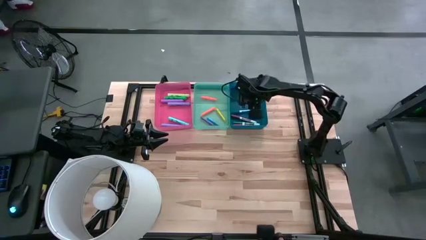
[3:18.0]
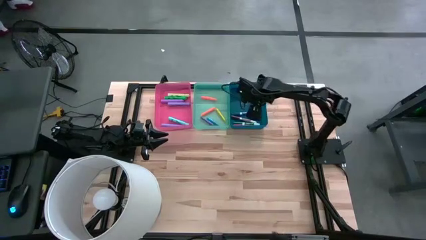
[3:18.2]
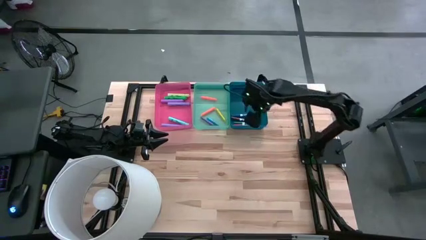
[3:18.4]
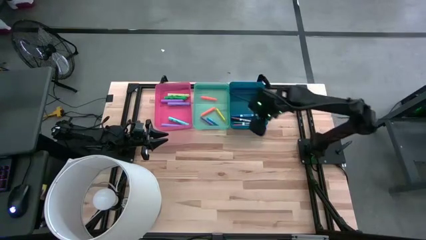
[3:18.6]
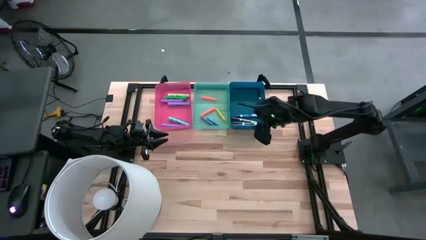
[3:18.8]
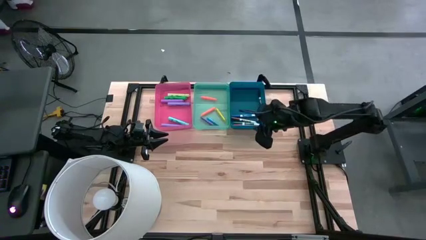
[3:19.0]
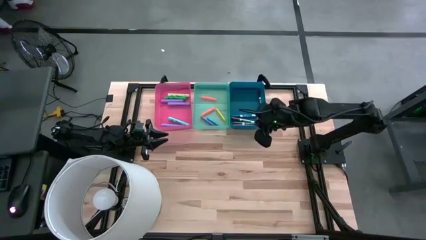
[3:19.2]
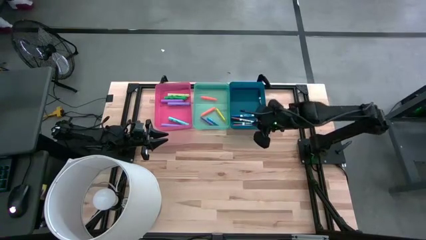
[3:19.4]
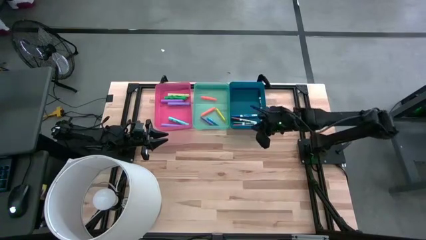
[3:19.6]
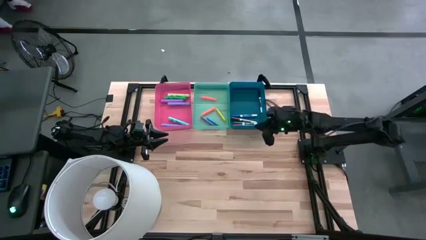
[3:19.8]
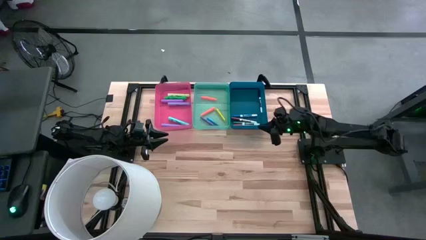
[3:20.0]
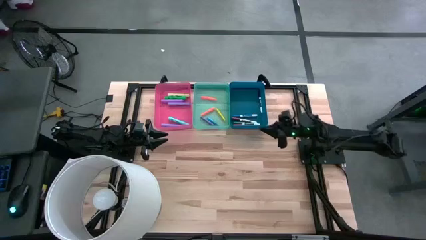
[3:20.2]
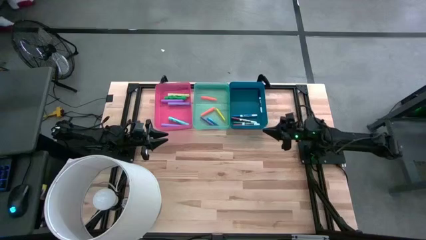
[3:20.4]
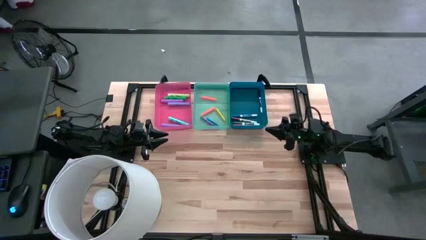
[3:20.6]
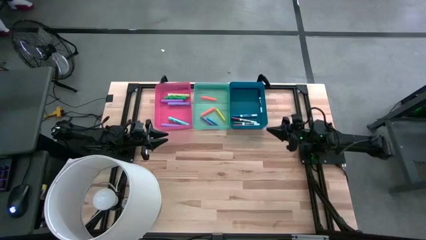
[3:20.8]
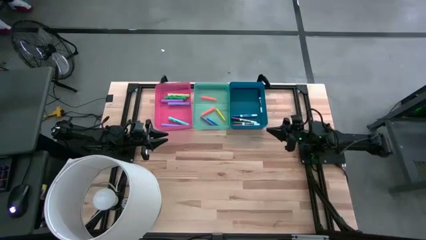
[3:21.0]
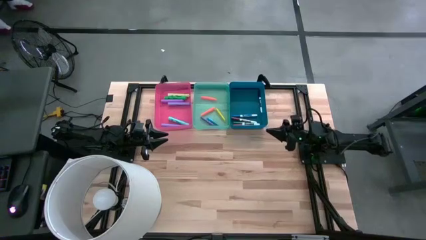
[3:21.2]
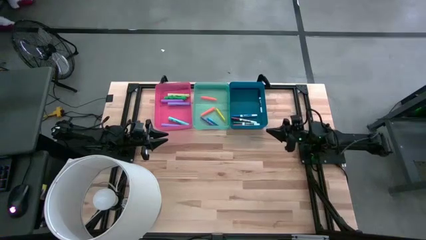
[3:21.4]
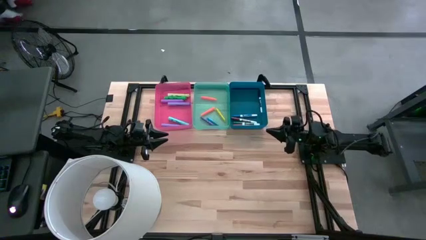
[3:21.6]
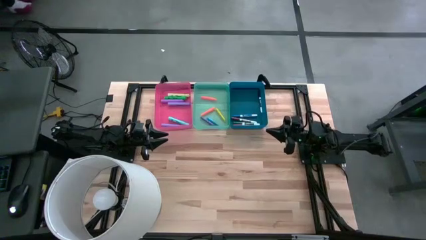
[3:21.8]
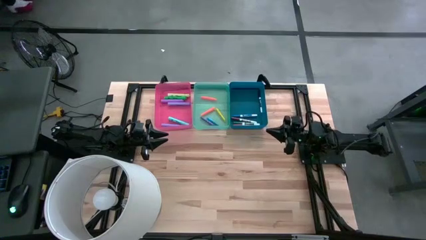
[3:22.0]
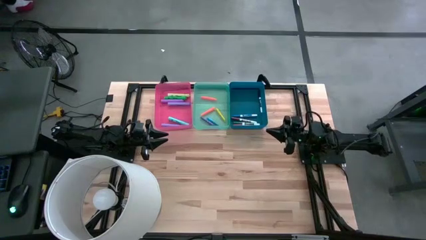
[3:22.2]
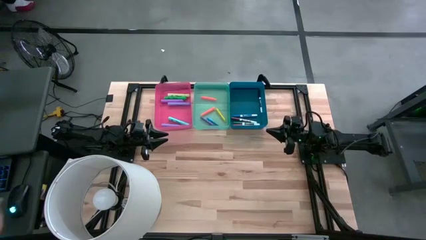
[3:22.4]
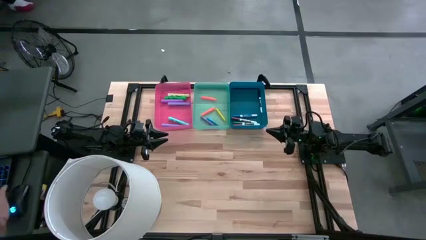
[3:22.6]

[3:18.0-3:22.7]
Task: Pick & Place Markers
Return to Home Position

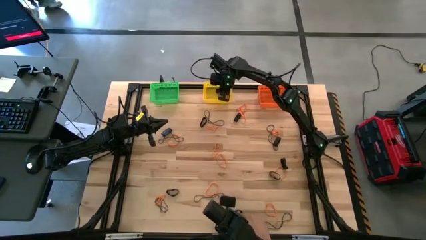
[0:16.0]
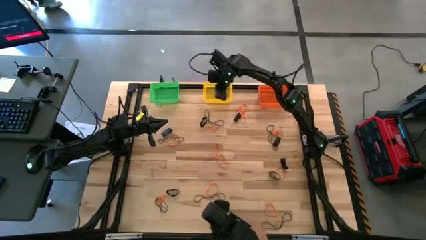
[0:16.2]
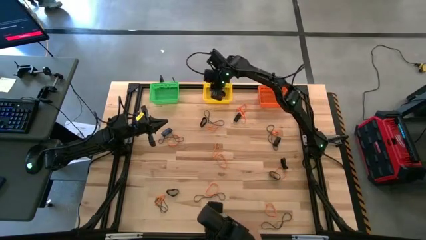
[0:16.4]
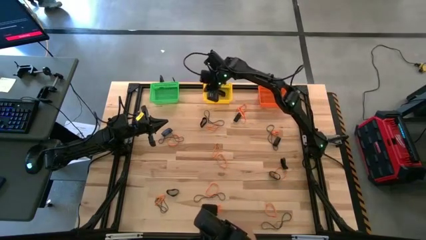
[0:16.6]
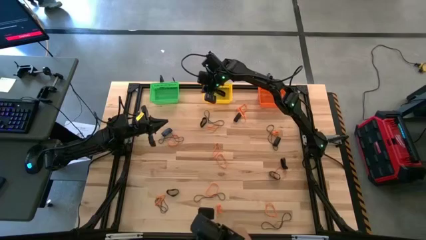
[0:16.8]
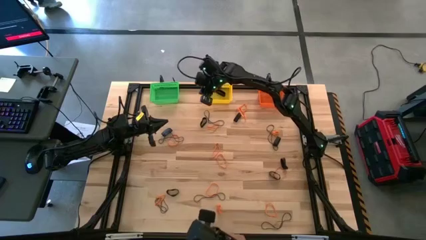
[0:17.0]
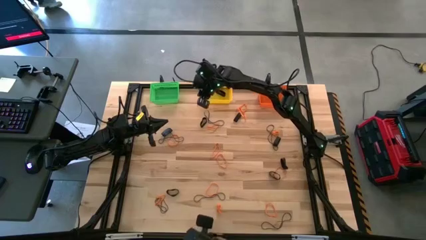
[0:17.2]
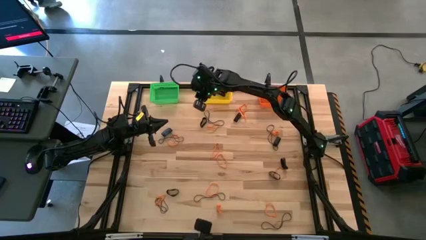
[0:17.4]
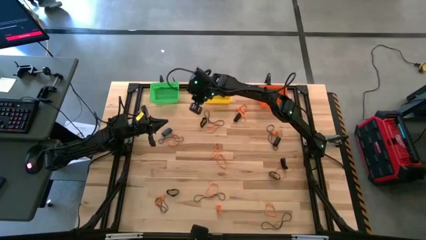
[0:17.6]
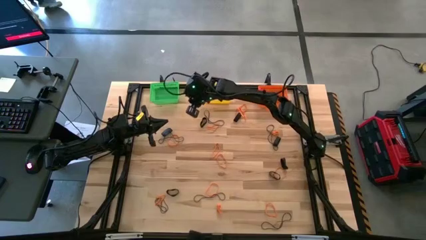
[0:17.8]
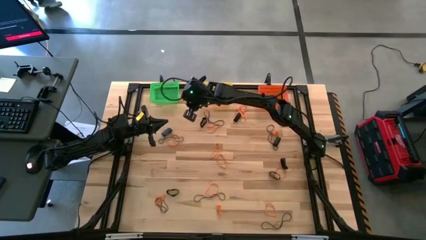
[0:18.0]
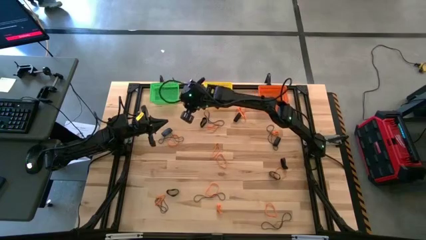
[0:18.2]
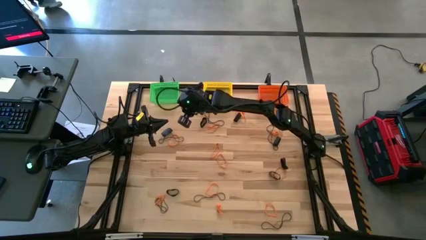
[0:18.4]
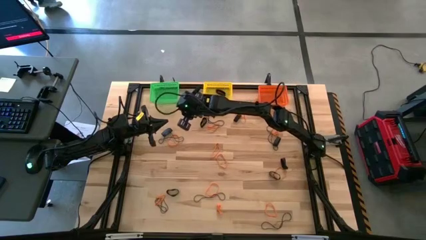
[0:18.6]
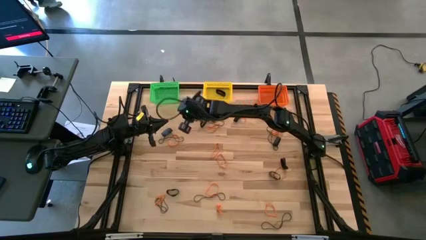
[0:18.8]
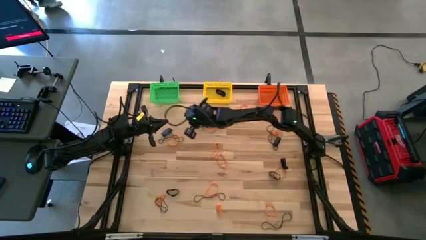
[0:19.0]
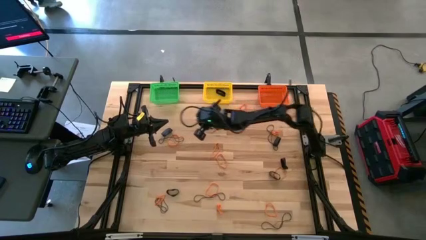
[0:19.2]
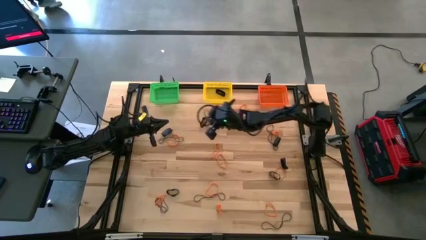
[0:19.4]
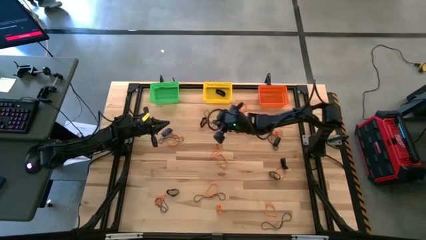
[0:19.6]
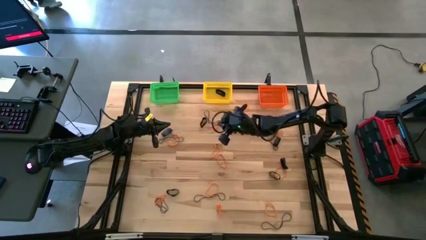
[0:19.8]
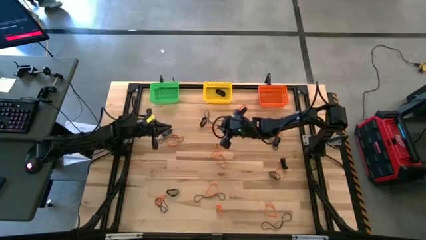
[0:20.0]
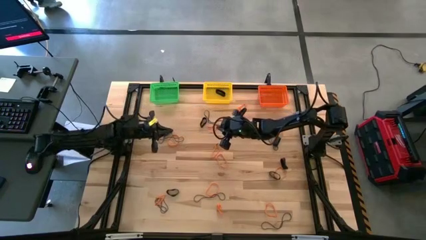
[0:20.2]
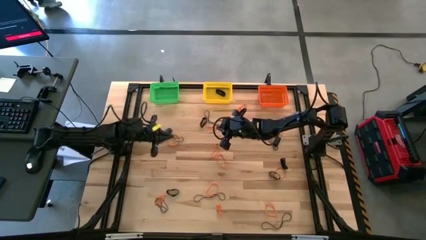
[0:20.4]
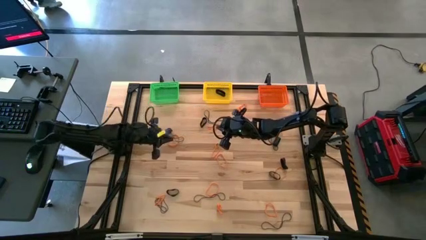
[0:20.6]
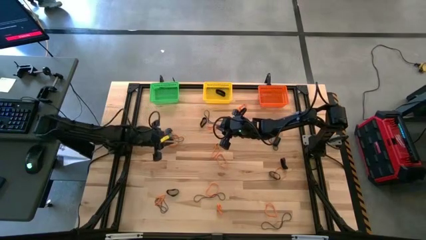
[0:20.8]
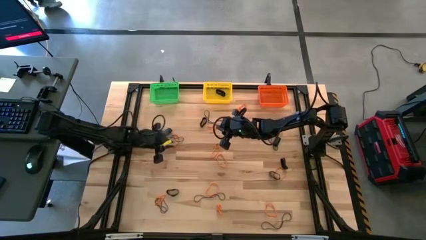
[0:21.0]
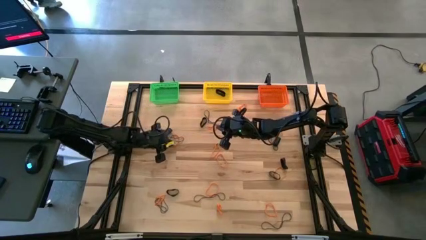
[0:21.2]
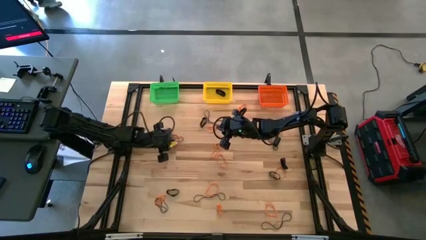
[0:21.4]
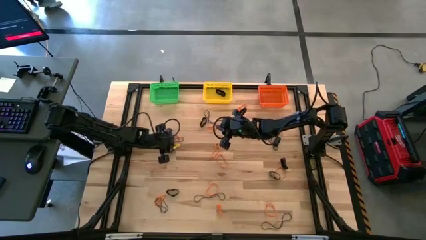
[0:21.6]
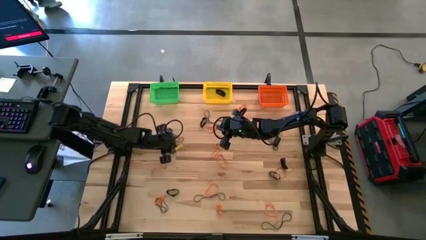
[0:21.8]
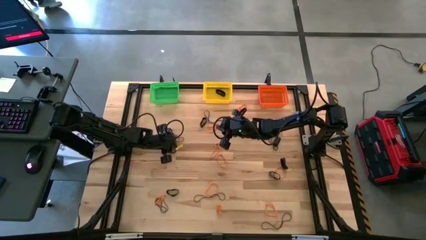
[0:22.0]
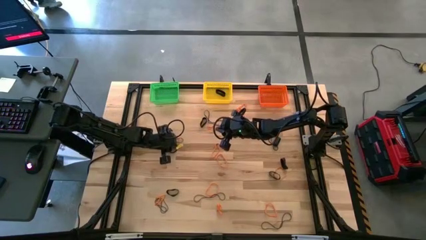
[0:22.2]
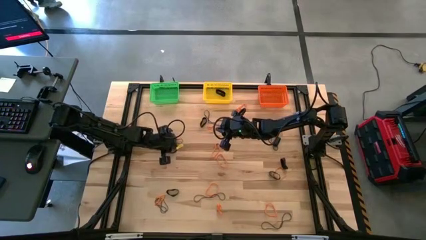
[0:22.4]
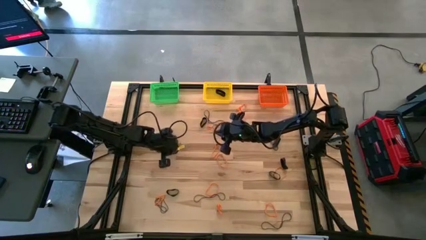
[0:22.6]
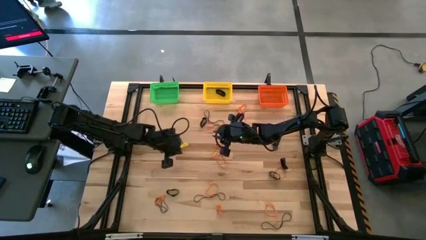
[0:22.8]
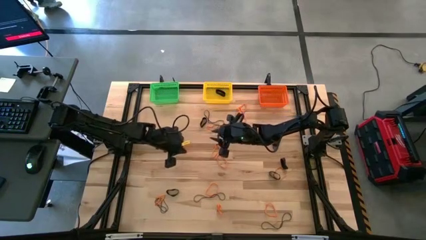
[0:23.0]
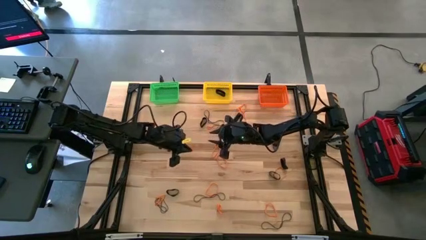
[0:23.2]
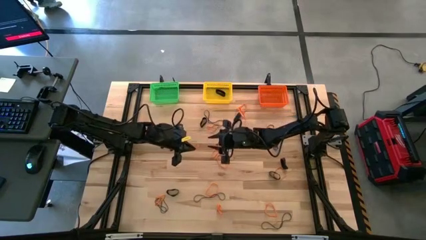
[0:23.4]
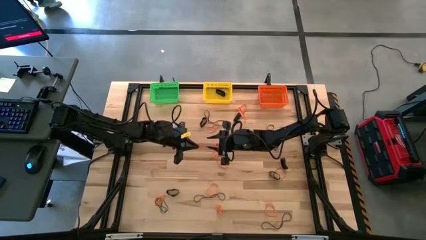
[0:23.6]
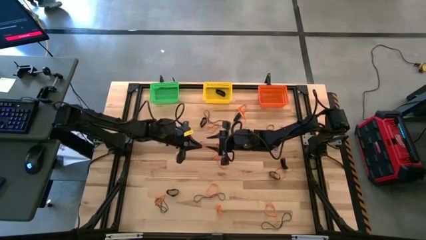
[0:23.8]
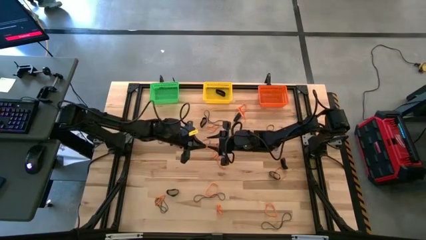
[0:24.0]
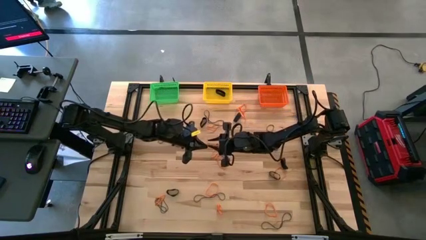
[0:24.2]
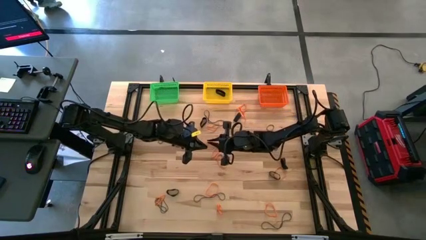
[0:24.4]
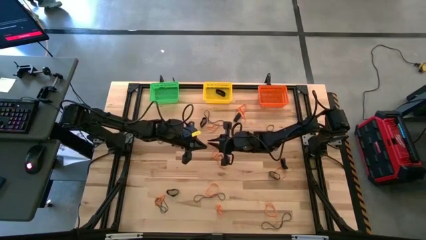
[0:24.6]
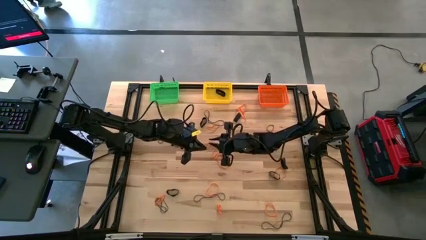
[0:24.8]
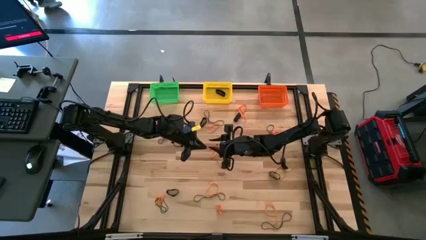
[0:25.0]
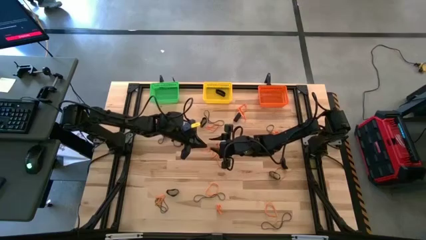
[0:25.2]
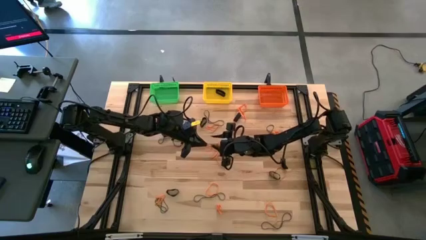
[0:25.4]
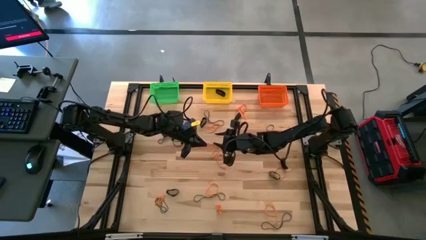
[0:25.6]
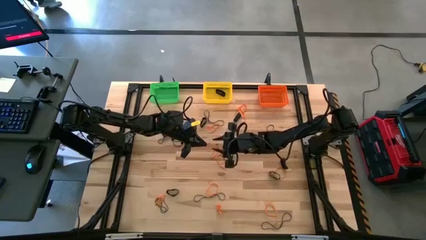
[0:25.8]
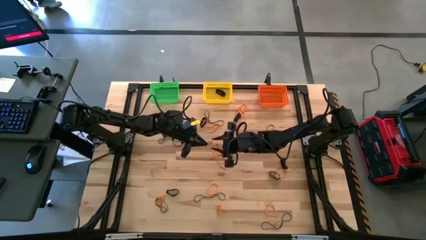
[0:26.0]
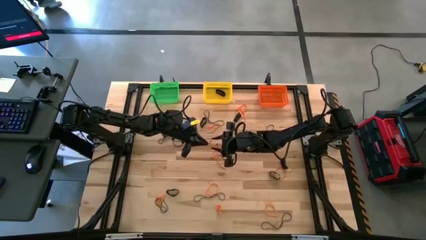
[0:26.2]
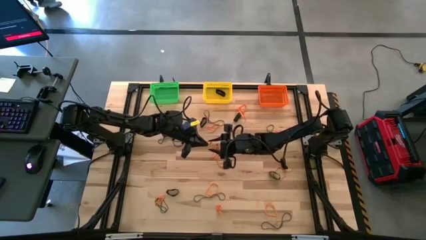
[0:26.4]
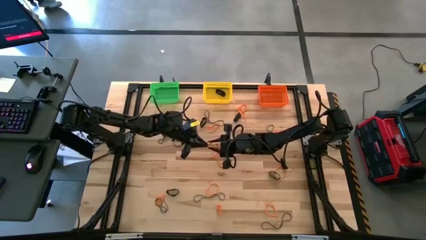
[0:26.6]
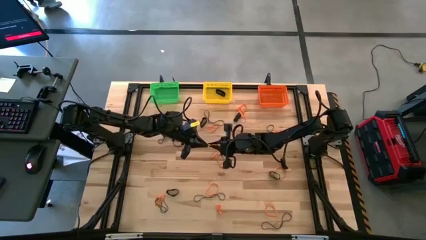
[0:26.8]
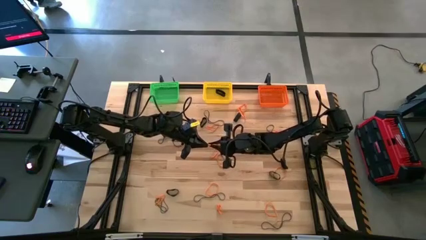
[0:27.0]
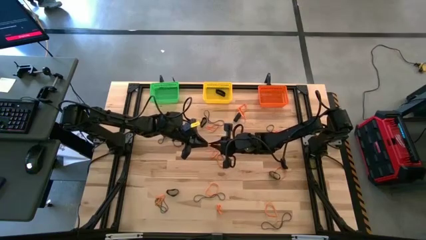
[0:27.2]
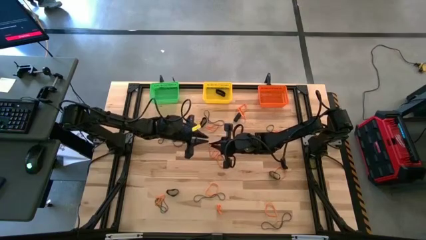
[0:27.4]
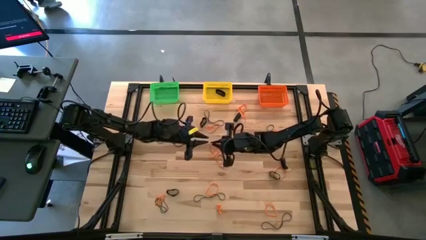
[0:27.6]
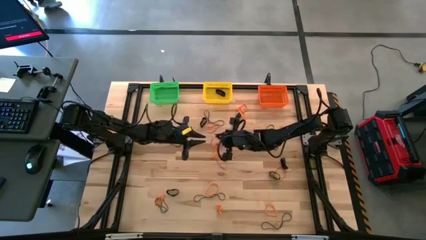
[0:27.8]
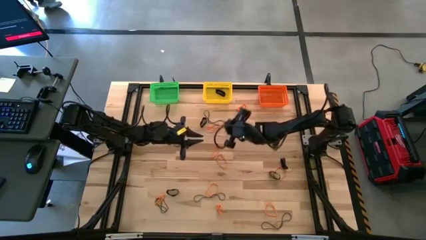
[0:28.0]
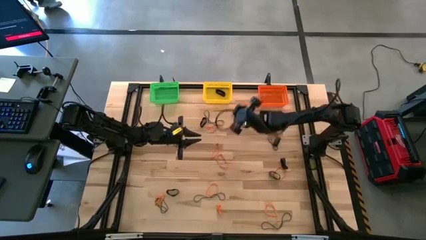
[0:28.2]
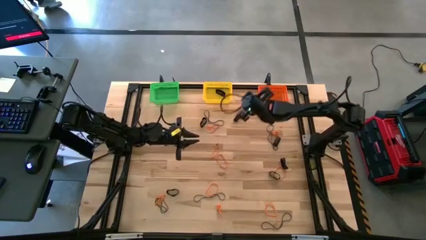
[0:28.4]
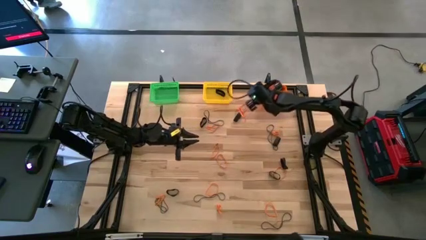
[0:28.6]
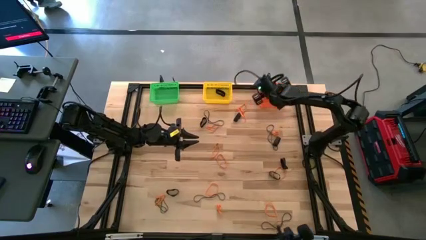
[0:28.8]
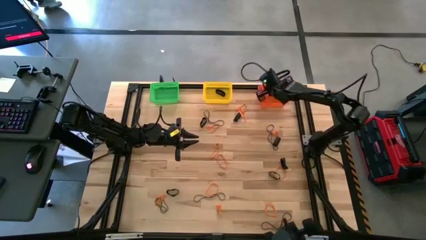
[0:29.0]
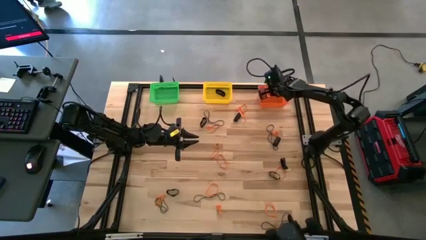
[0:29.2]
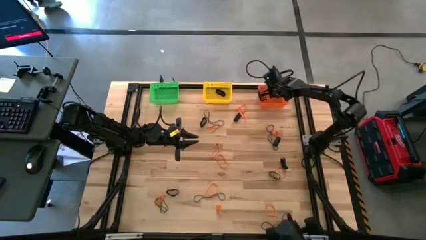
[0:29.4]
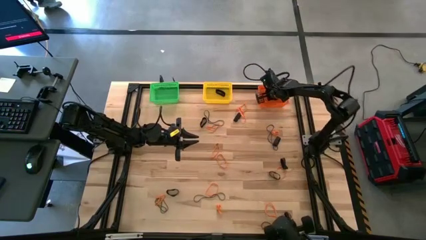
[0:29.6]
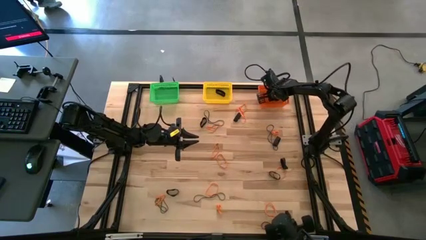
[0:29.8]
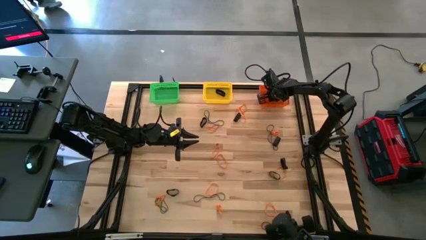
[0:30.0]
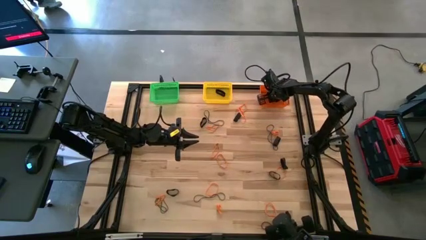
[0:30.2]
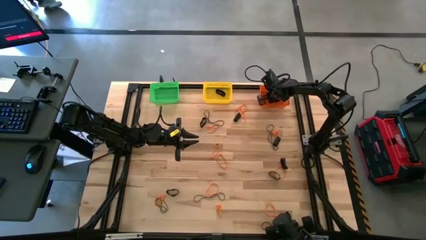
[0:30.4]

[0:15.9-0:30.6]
Task: Sort rubber bands into baskets
Put the orange rubber band into the orange bin
